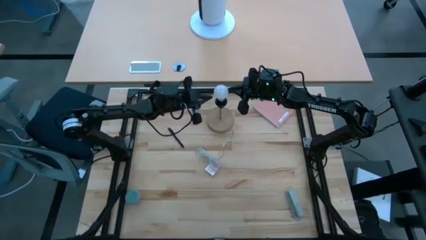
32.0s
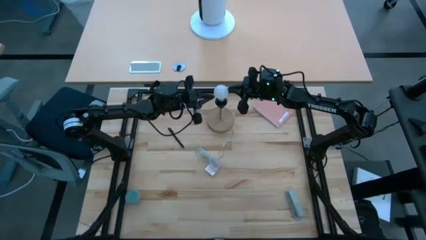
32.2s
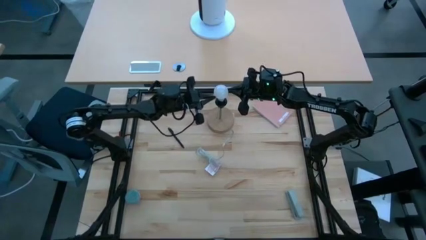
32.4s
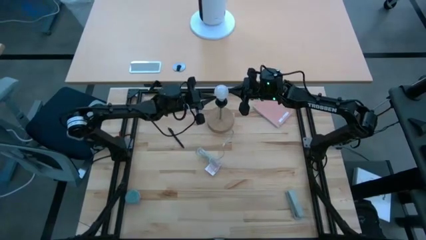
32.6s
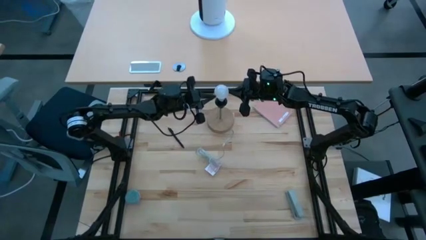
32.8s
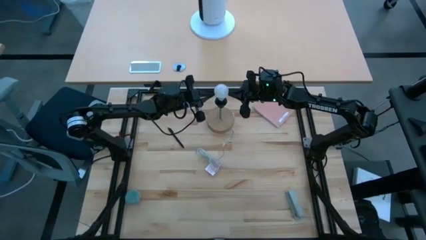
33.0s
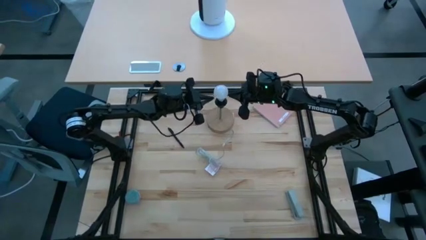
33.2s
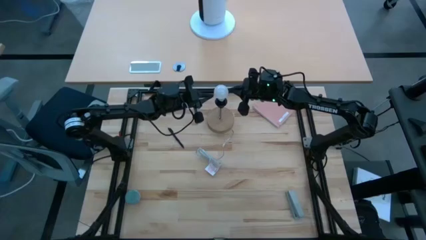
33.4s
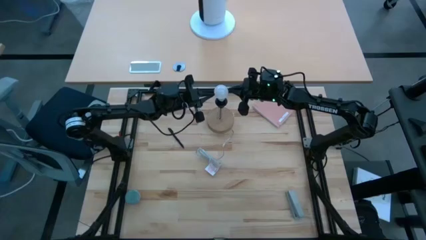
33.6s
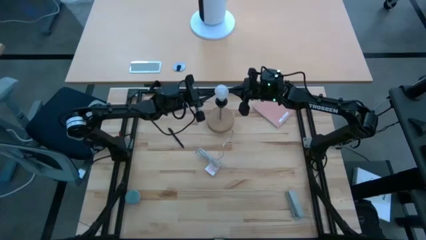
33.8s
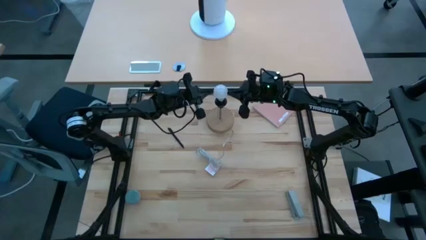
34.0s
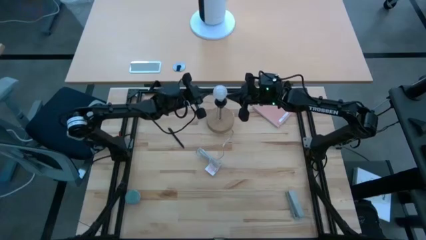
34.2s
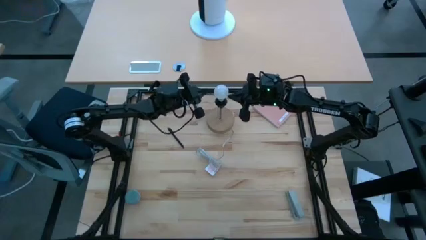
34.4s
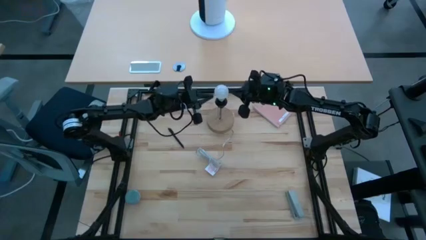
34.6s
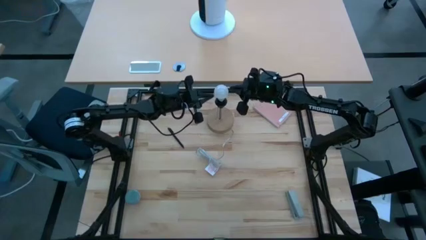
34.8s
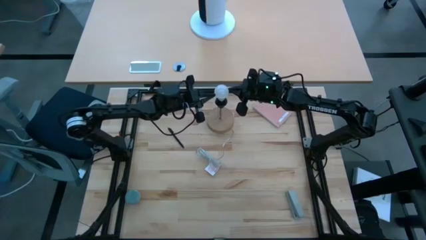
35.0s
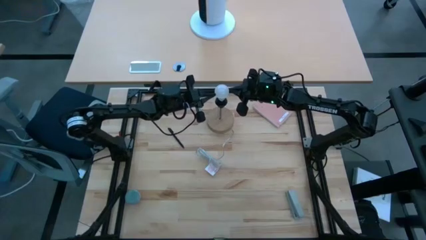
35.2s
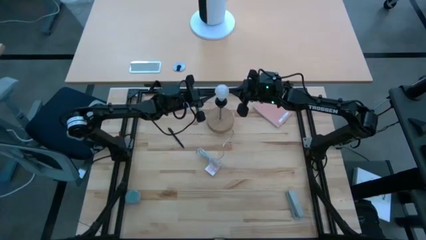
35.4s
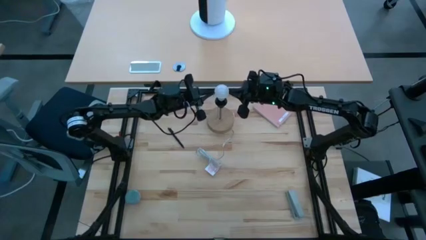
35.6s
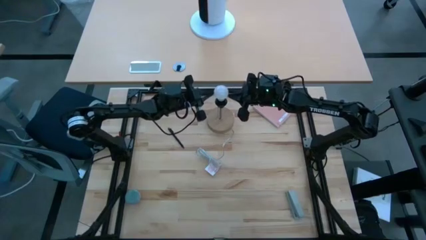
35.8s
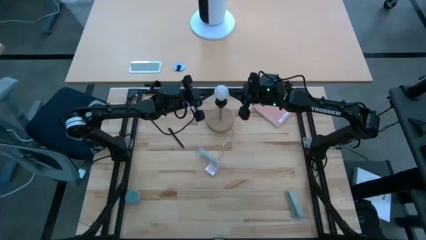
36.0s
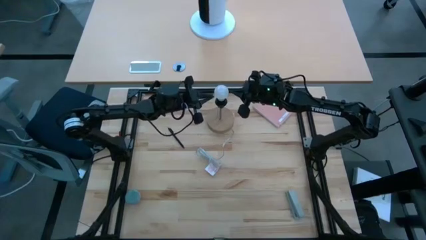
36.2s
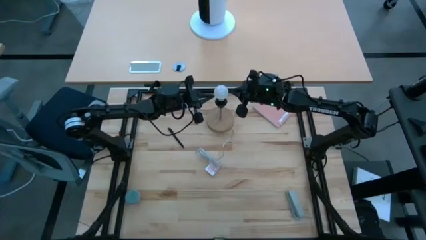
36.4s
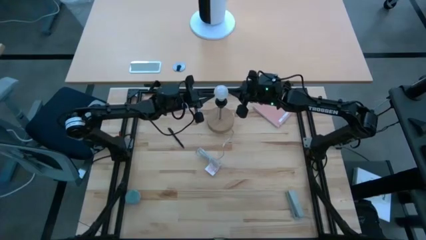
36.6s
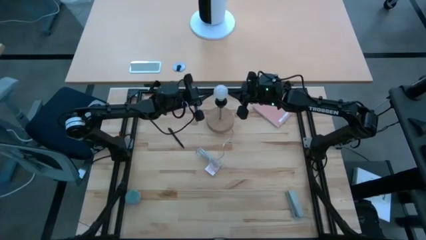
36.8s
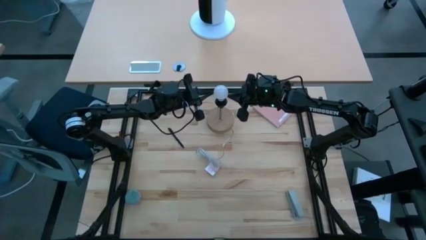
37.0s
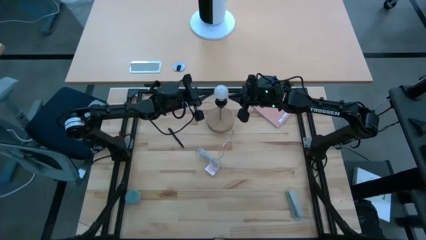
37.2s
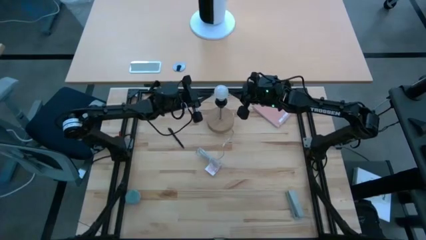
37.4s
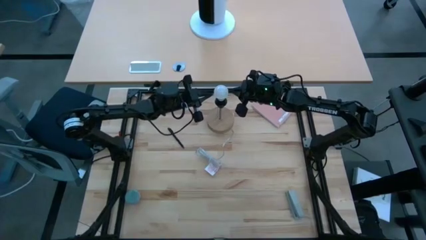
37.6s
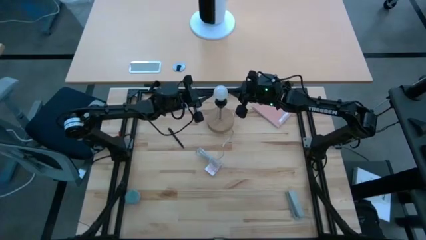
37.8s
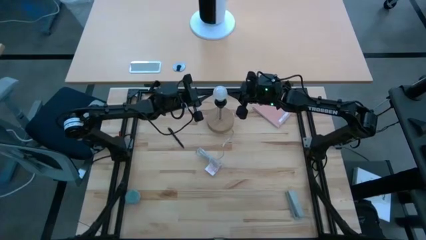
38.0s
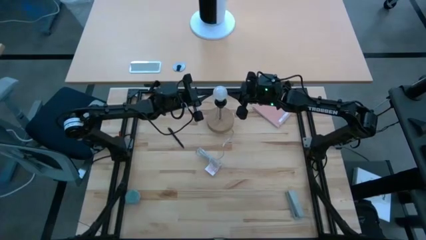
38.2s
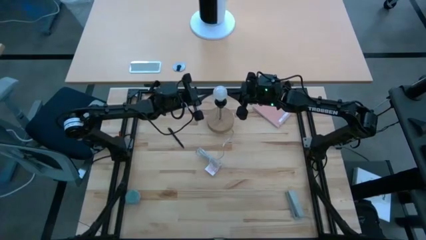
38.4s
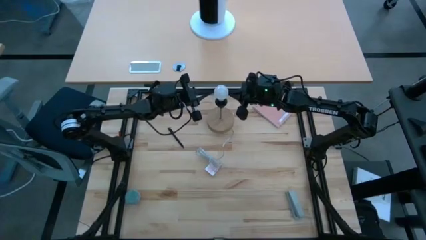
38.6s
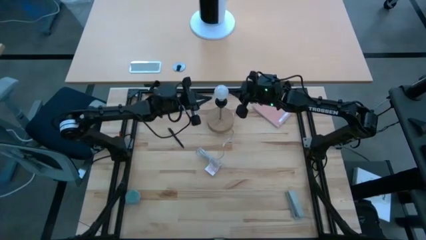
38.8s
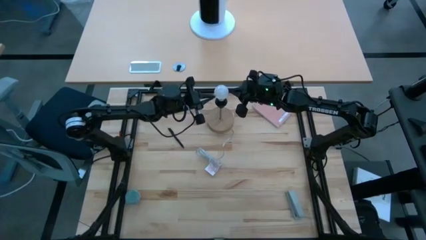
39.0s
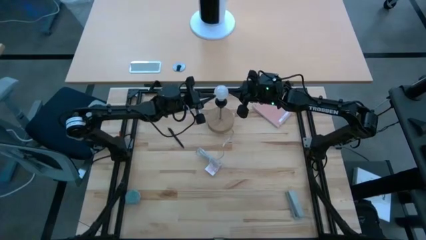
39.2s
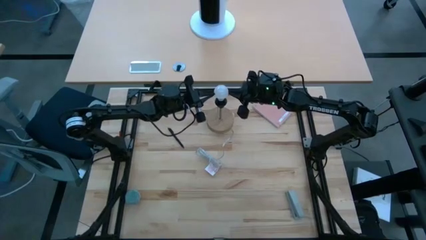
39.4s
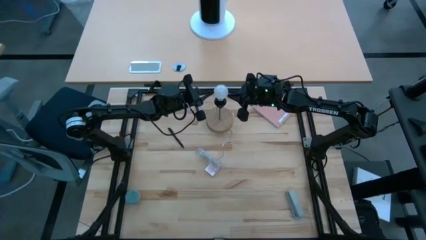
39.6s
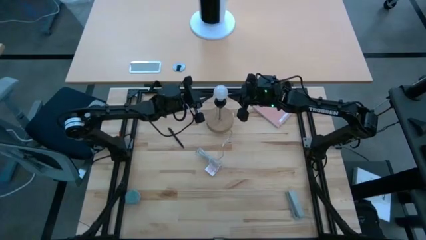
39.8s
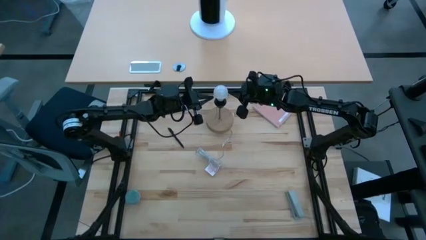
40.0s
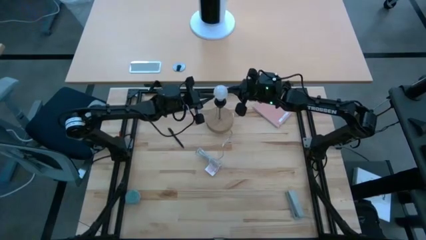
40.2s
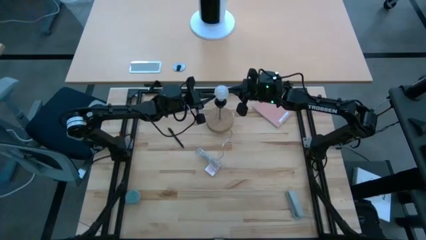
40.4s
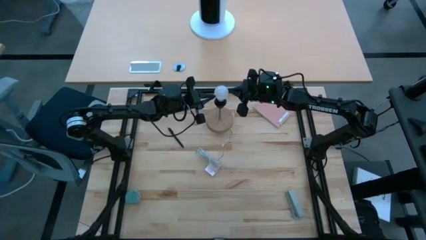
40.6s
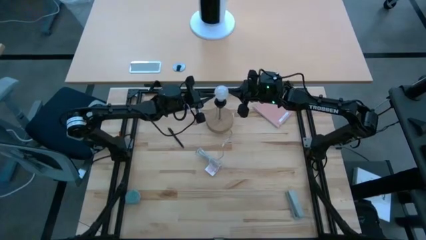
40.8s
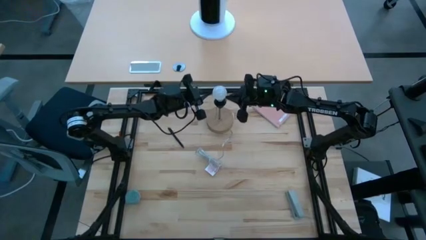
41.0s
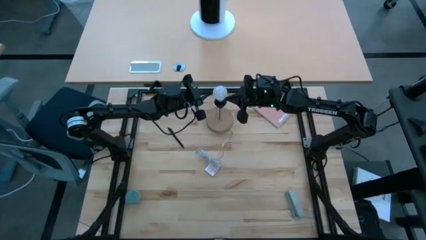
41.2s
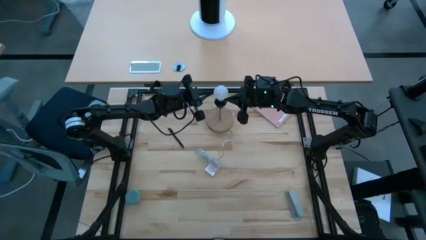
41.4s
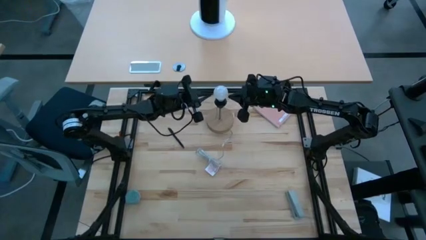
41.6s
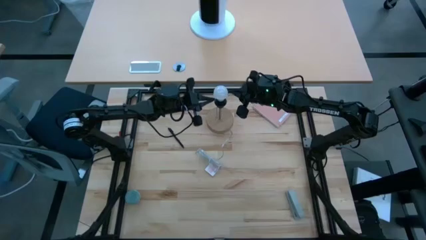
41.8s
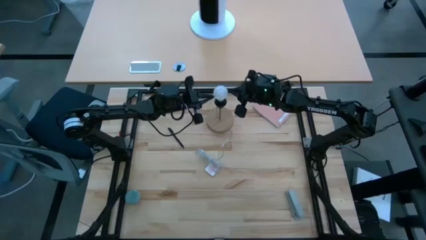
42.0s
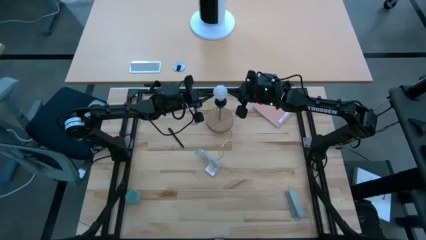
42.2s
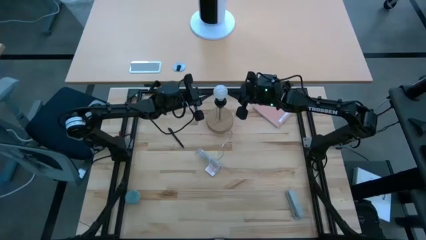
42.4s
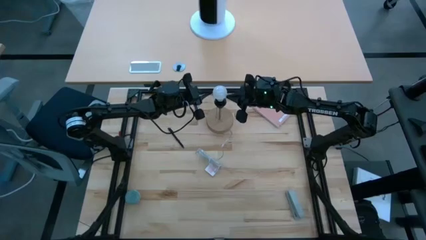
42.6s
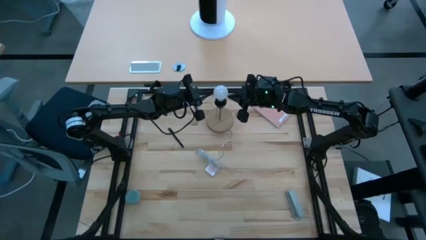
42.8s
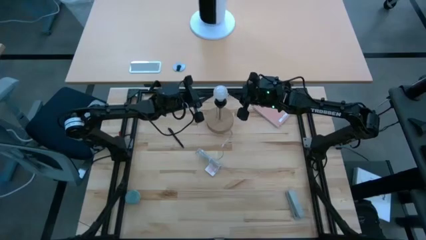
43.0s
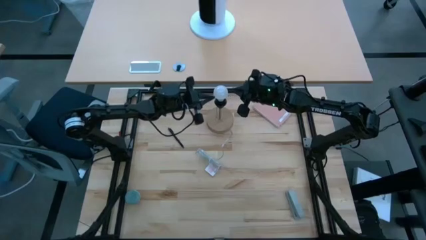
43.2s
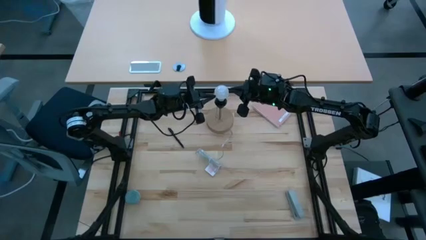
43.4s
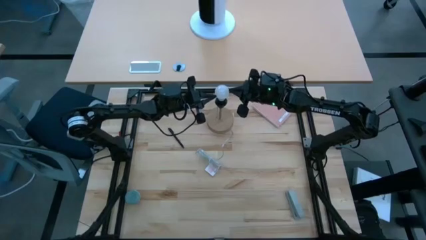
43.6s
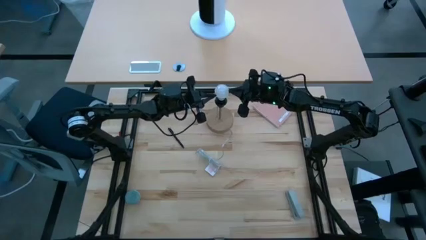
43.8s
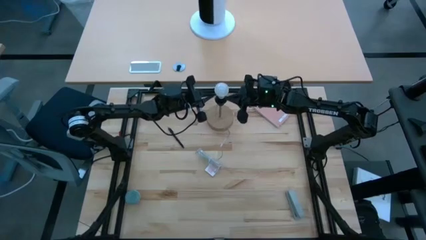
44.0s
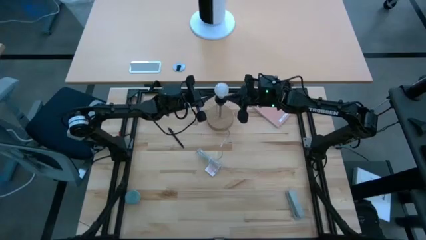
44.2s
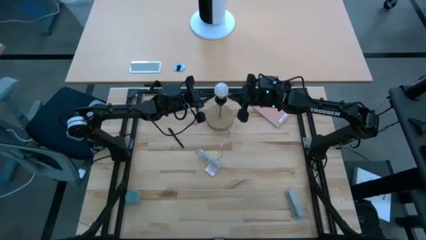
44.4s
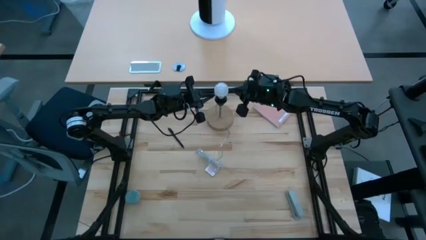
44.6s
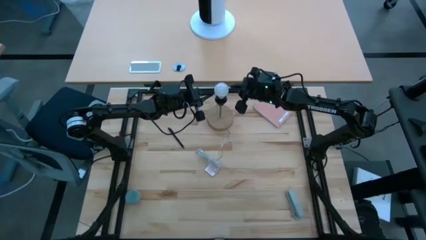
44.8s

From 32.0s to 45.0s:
Task: Screw lightbulb
Insert the lightbulb into the la

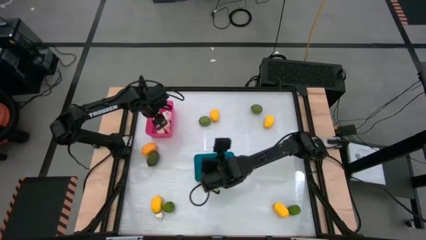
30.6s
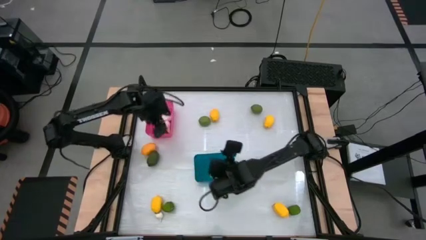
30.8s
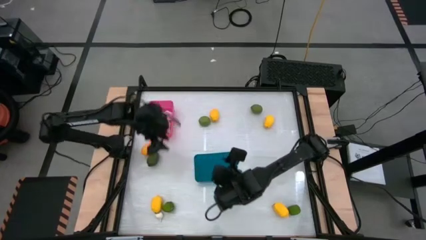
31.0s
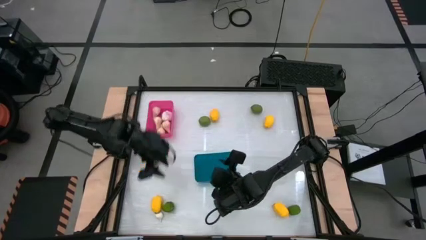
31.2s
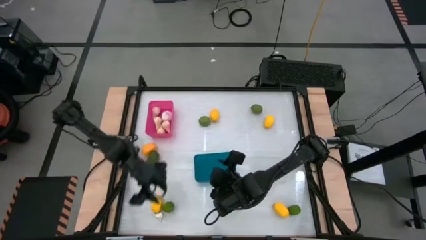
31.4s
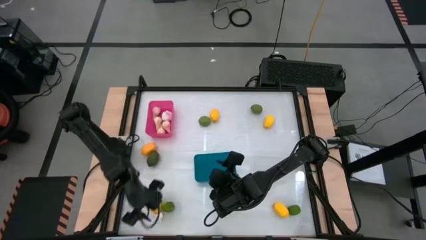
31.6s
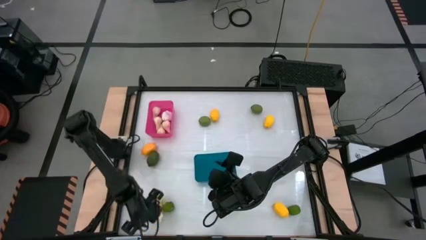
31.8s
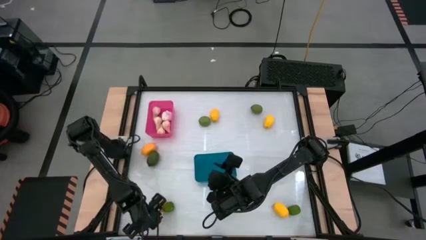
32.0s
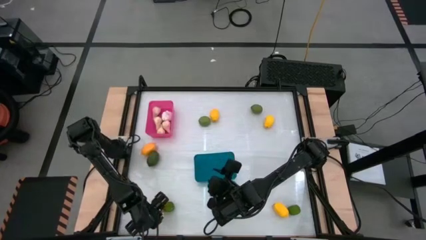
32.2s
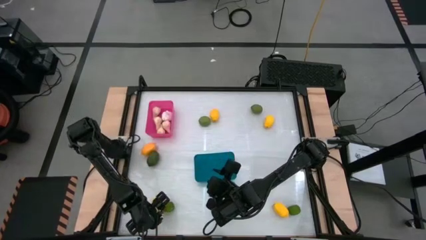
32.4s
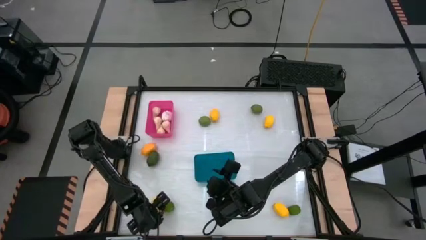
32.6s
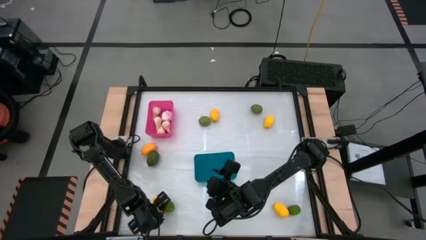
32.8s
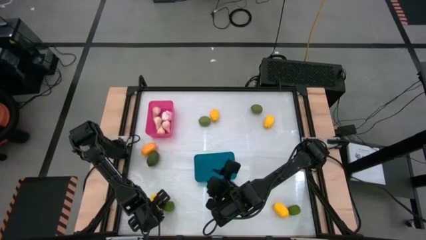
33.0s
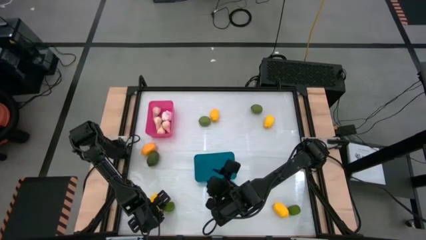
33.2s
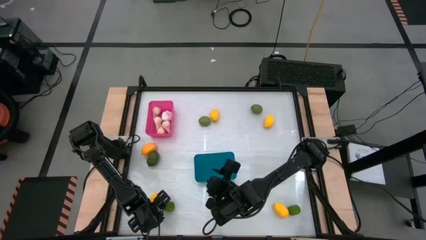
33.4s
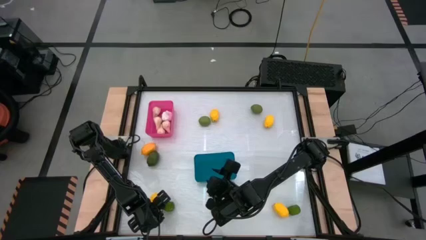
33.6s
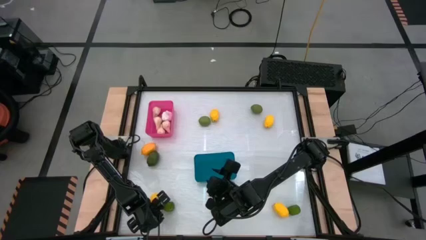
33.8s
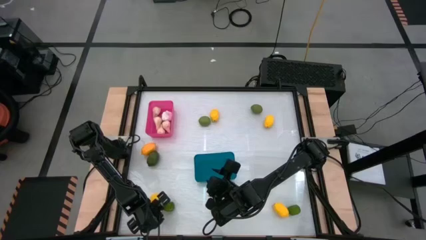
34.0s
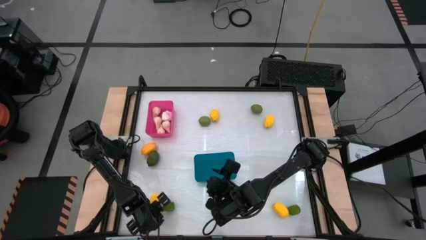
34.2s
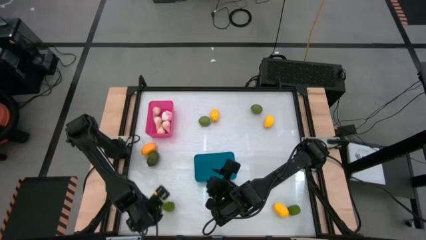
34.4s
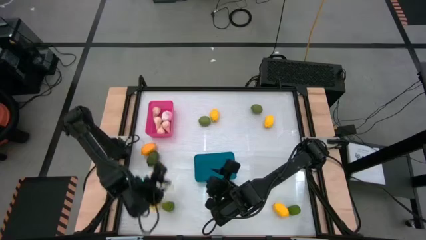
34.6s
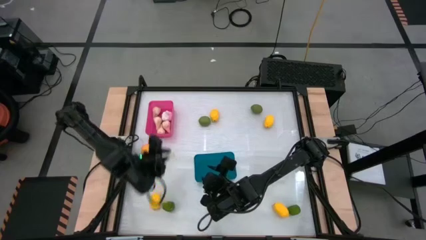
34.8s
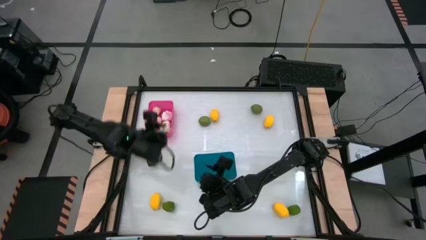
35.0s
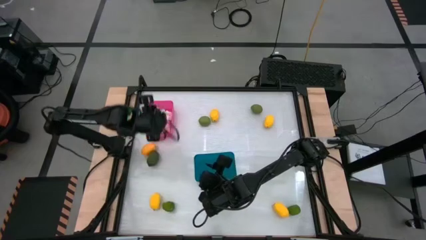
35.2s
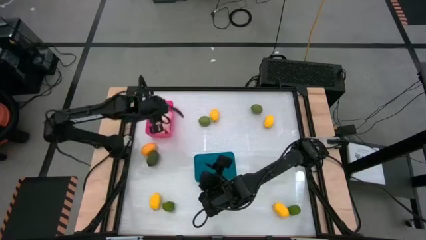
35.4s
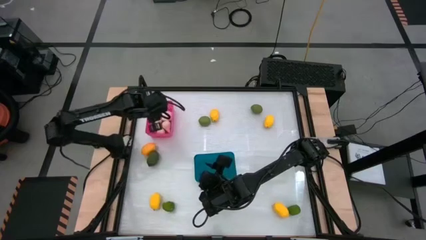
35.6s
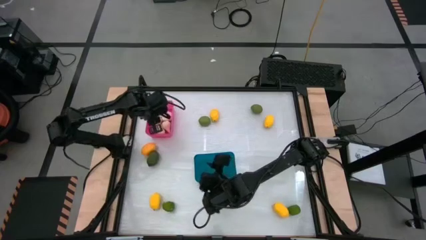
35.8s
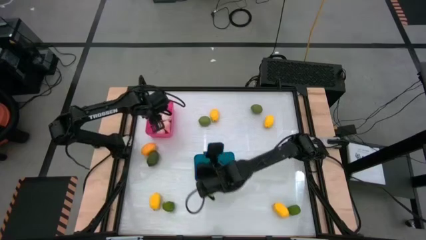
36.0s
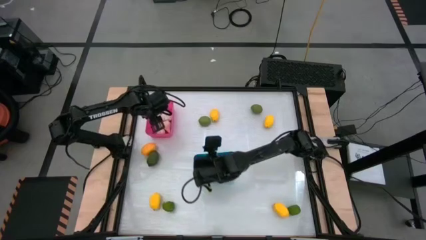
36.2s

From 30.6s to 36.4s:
Task: Sort produce into baskets
Put the garlic into the pink bin
